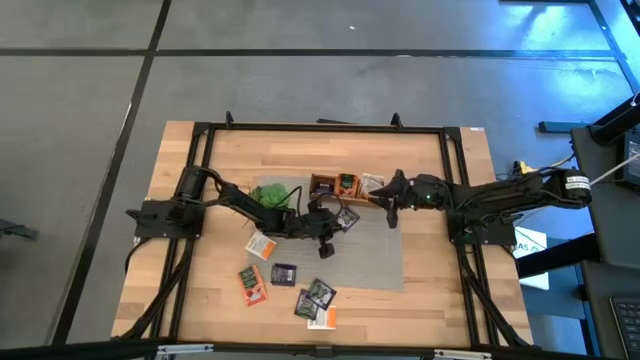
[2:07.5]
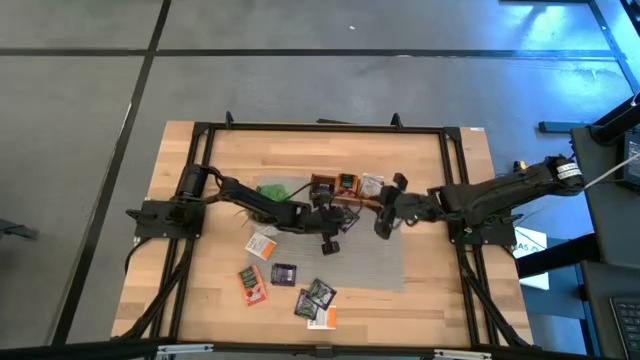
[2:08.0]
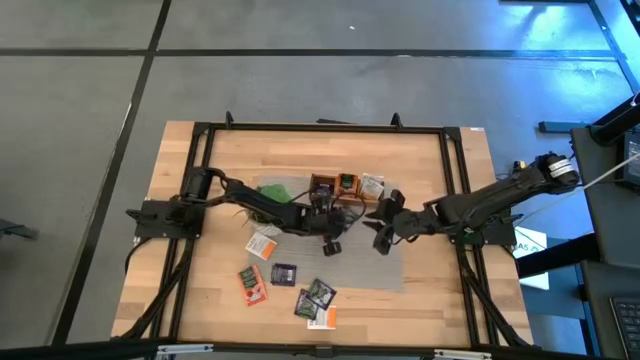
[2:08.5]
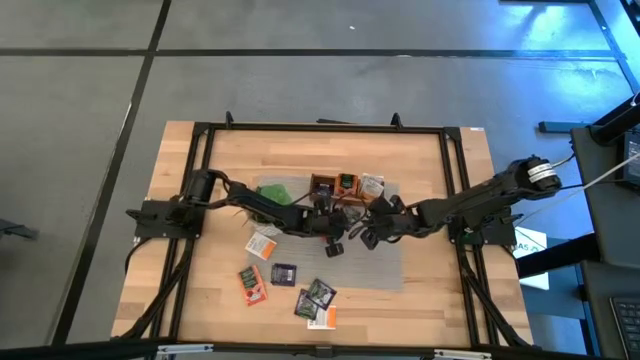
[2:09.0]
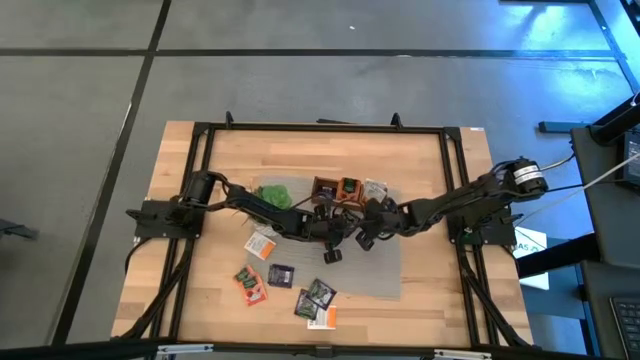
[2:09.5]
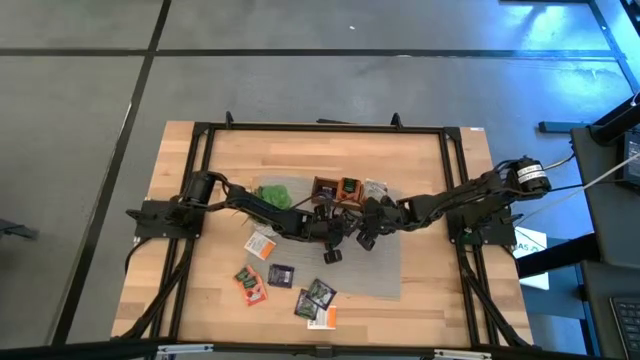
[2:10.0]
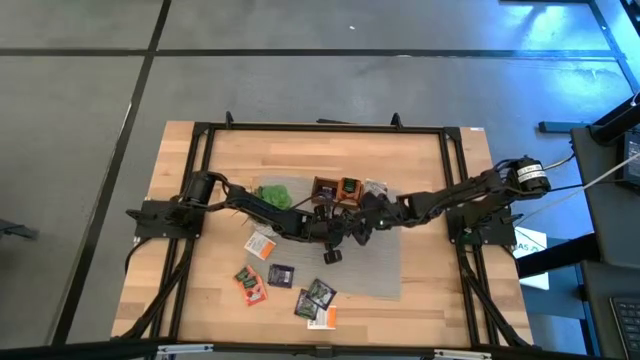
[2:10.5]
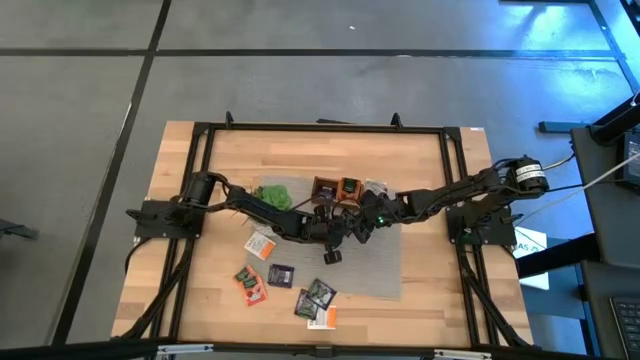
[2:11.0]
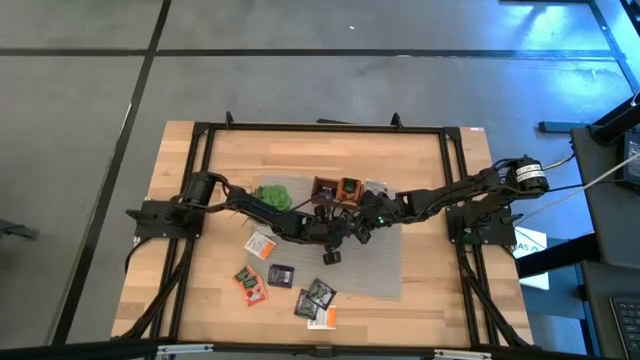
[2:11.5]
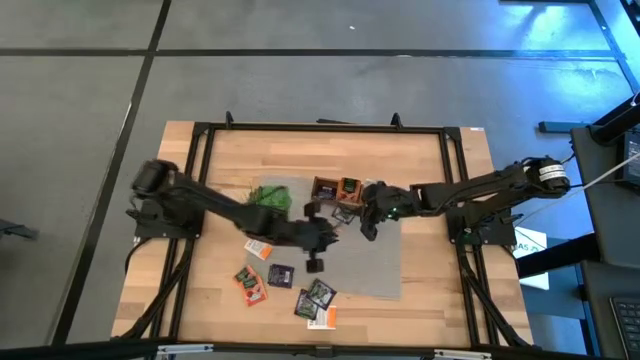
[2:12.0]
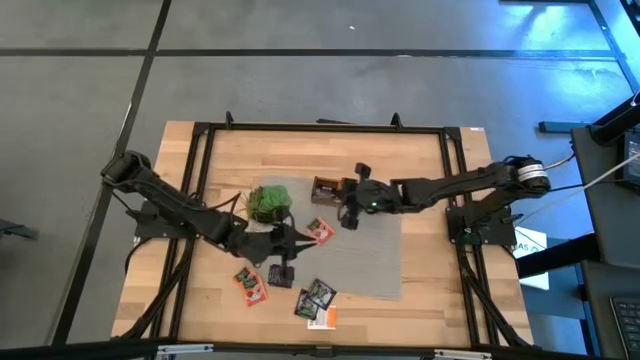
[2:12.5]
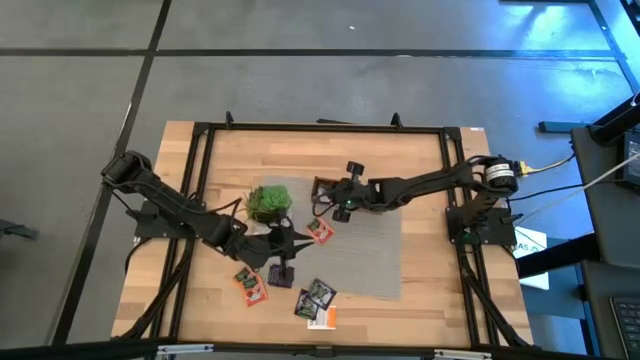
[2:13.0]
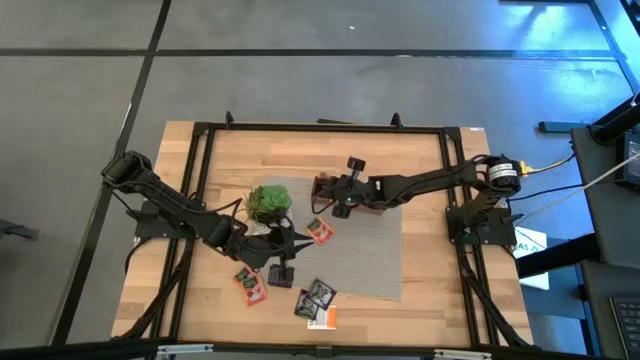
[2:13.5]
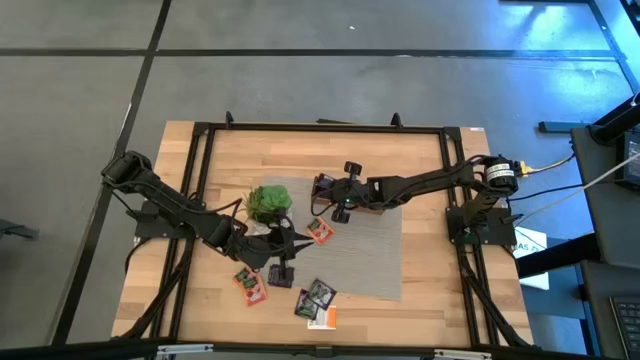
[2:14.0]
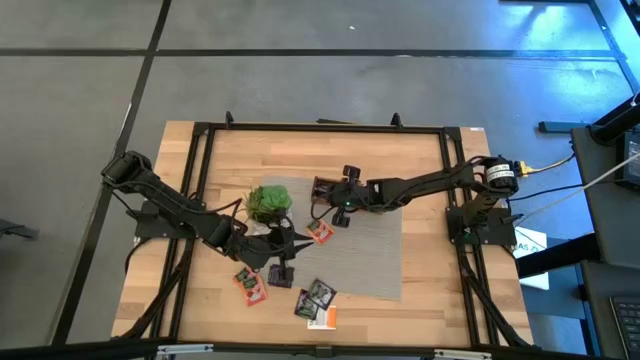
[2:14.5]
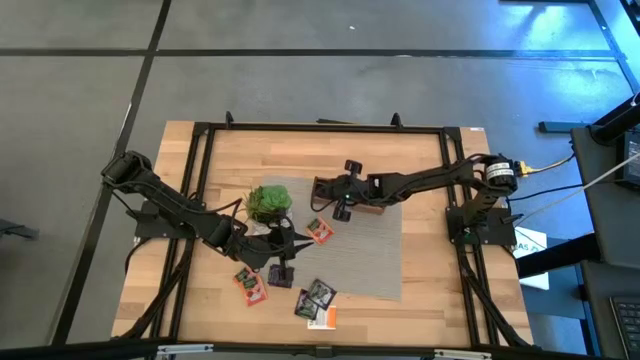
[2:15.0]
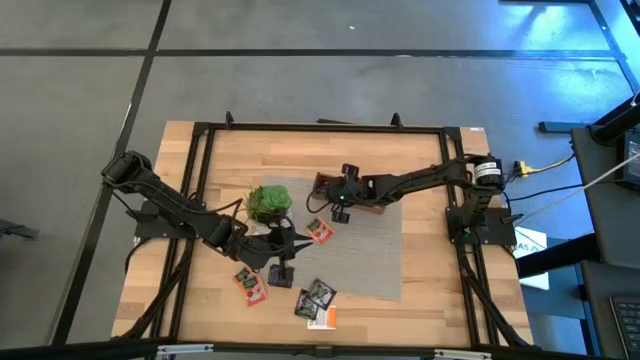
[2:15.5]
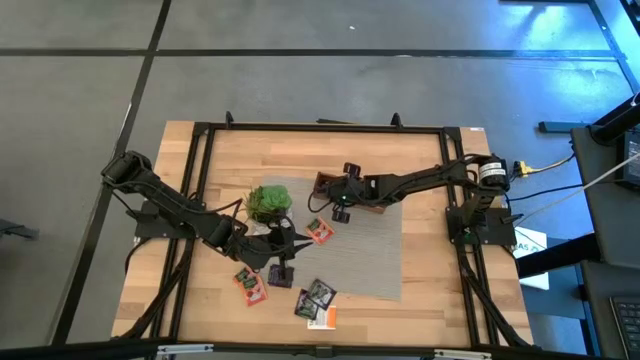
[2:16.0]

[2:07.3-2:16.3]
Task: Pick & Place Tea
Put the violet tea bag into the left section of the wooden organizer

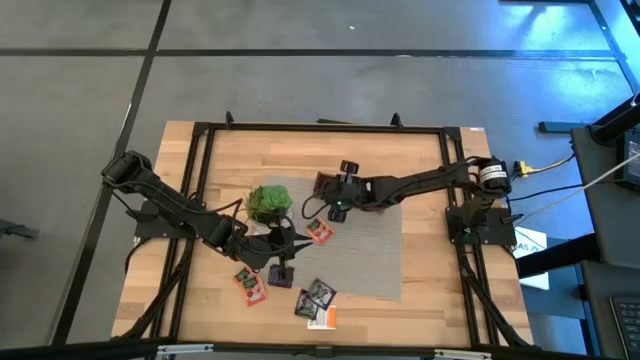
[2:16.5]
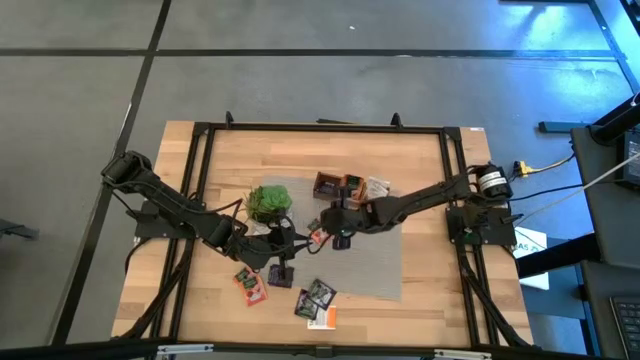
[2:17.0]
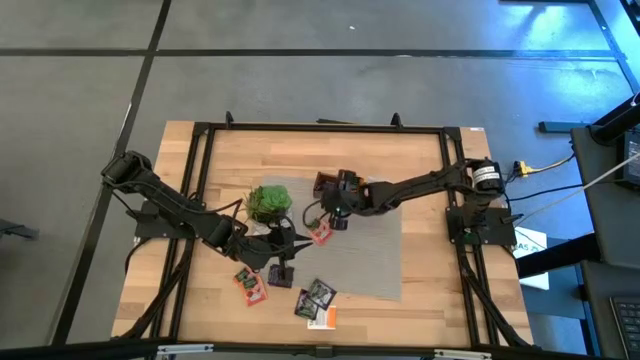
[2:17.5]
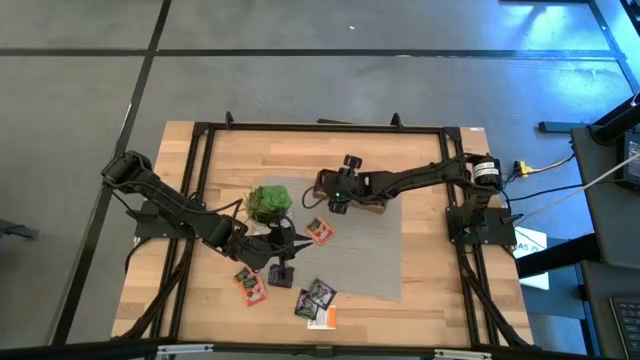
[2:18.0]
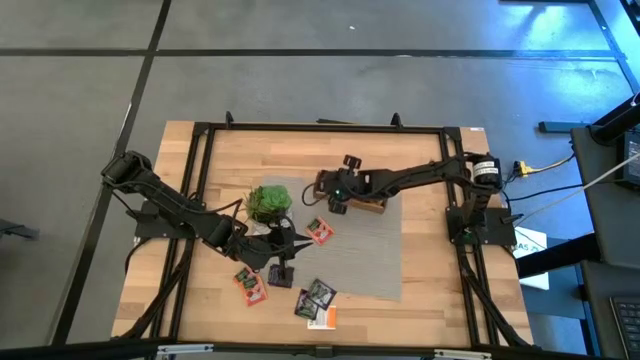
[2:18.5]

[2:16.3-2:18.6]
Adjust the violet tea bags in the wooden organizer

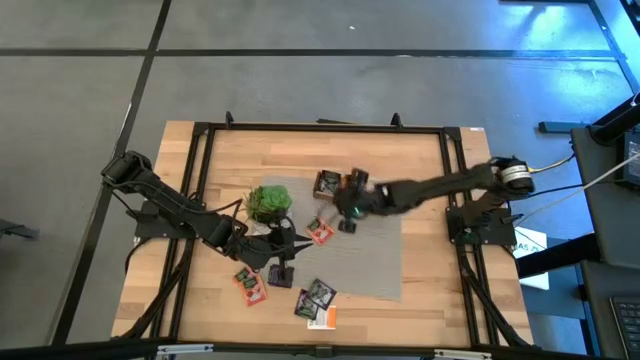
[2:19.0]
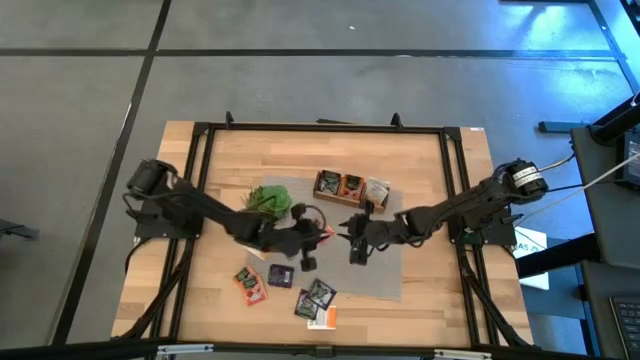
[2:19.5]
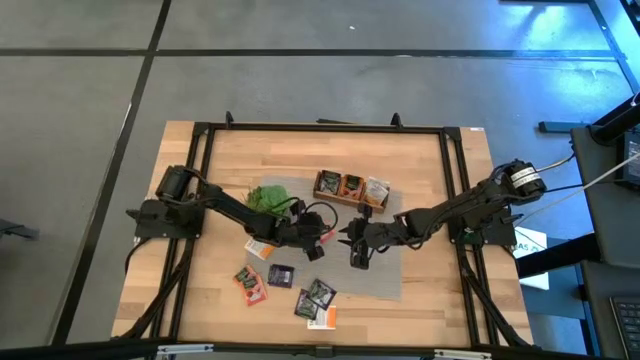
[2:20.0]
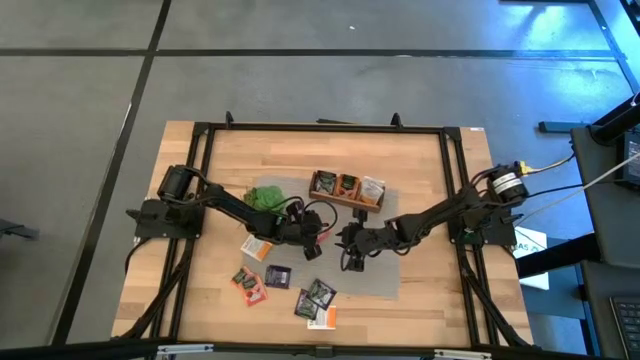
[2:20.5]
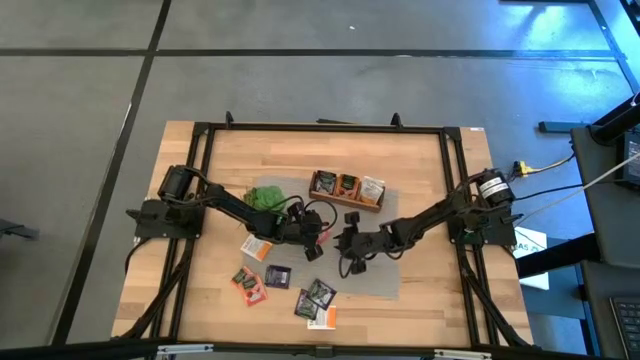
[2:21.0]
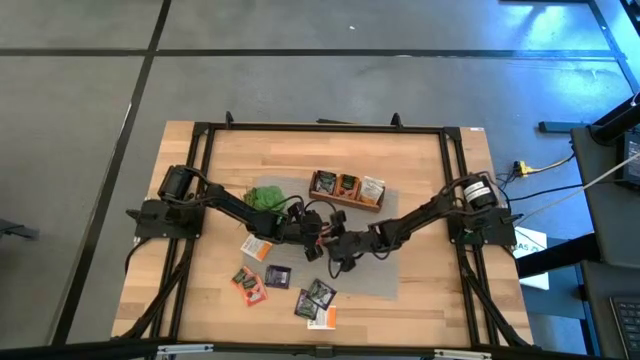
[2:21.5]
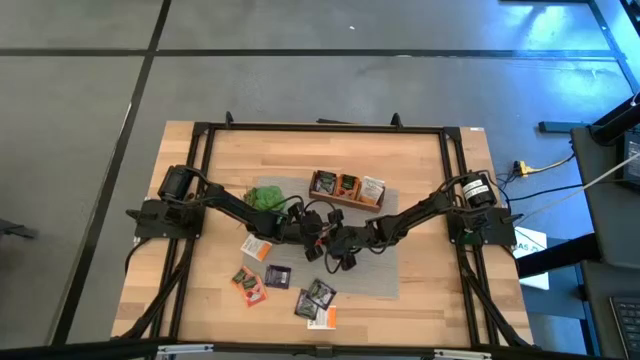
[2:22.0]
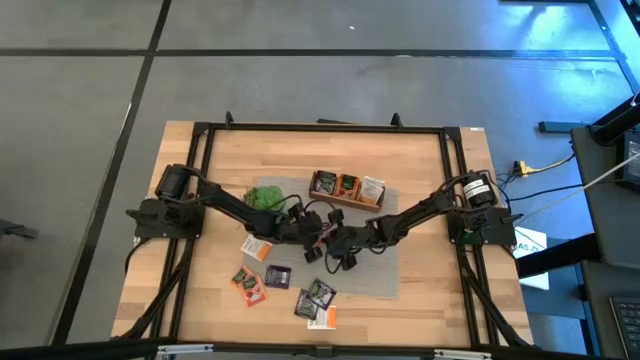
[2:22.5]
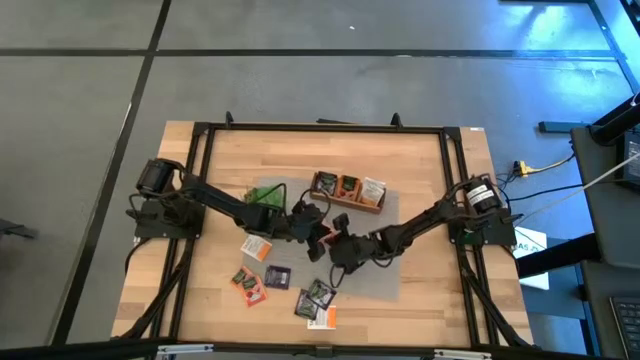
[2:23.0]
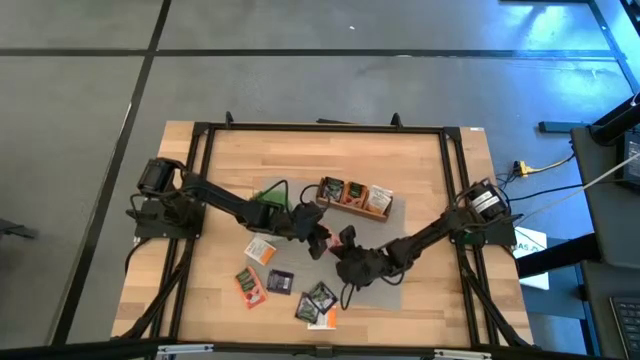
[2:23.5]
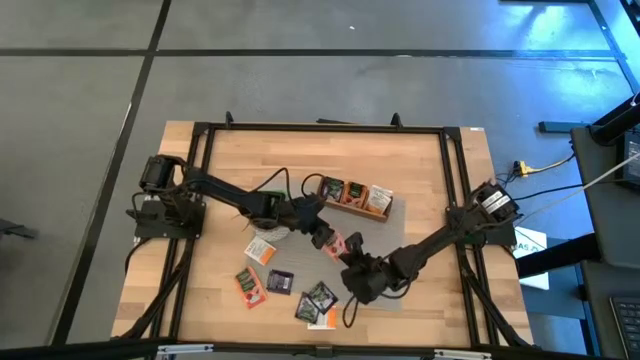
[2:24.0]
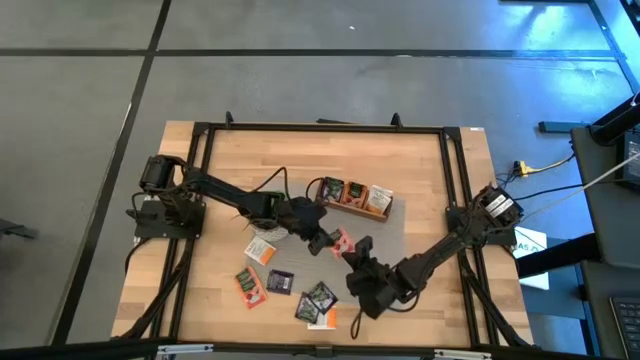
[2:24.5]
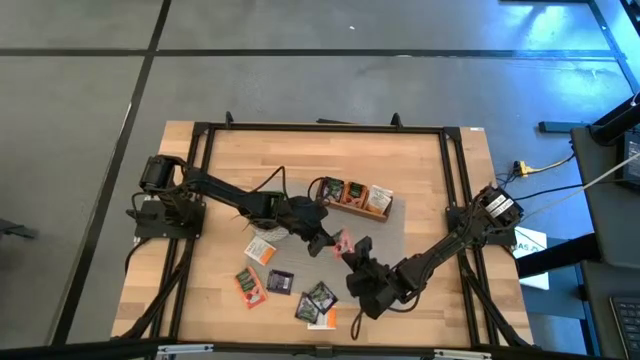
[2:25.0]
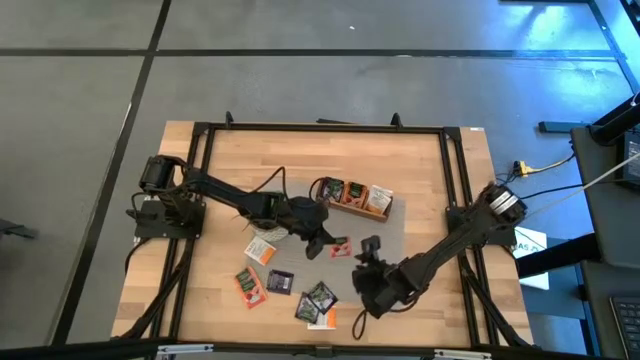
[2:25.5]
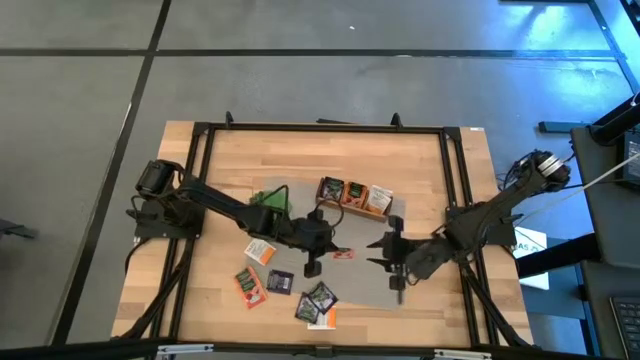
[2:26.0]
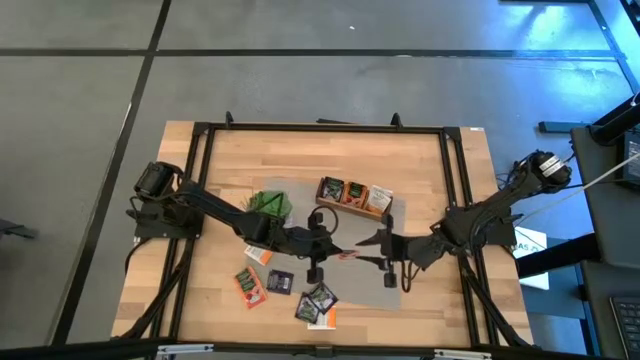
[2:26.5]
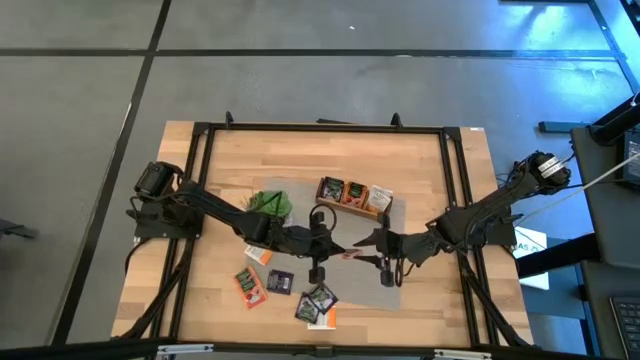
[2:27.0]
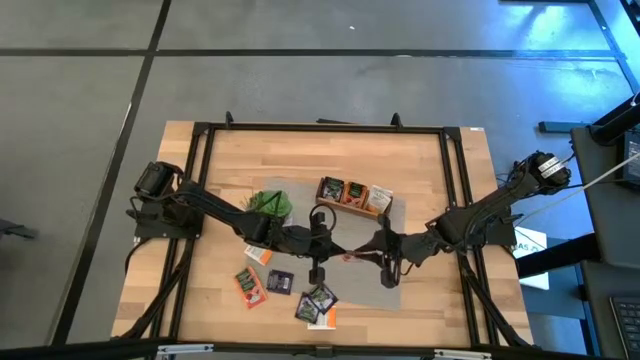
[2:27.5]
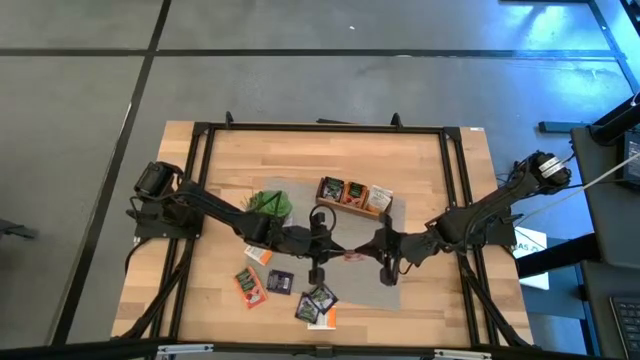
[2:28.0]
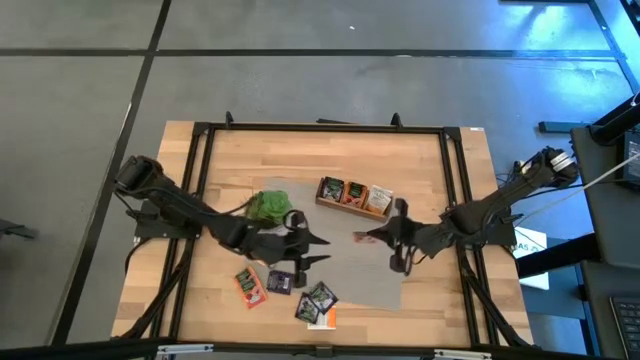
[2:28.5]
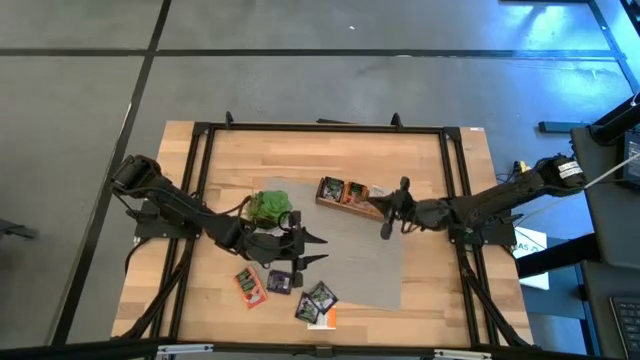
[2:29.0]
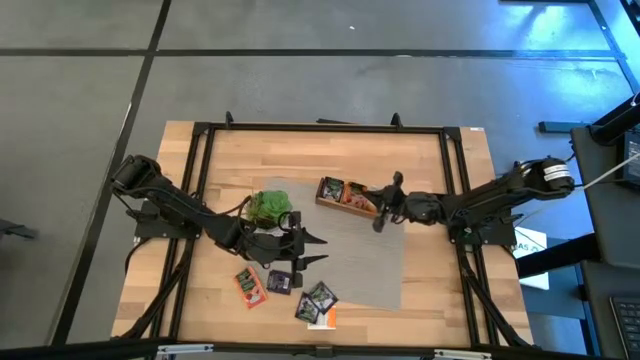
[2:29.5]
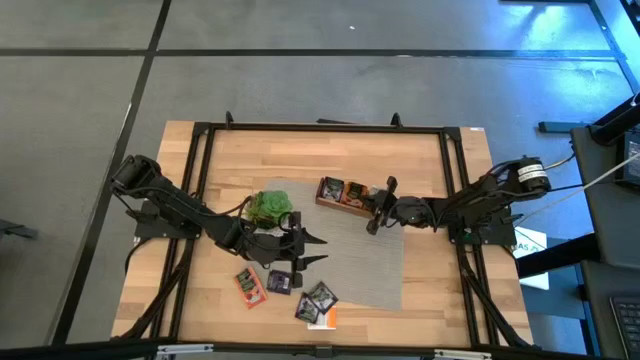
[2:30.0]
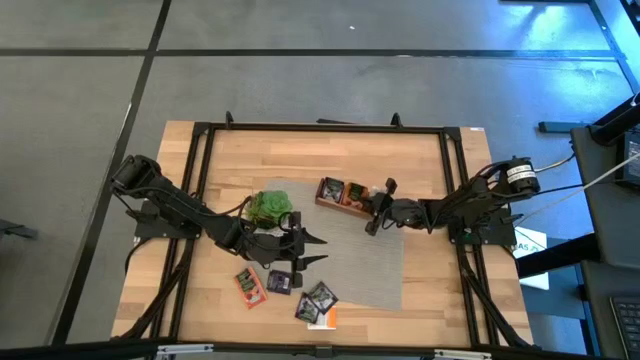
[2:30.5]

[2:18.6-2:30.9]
Put the orange tea bag into the middle section of the wooden organizer
